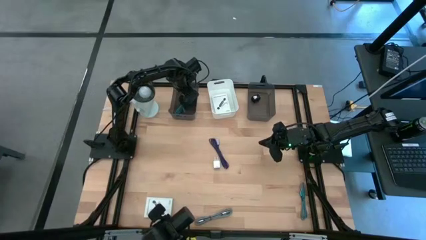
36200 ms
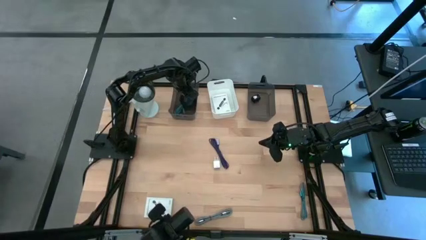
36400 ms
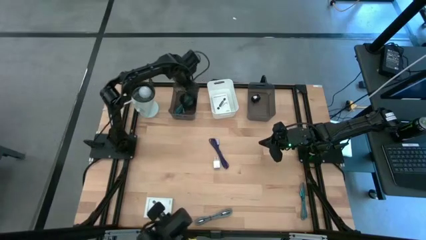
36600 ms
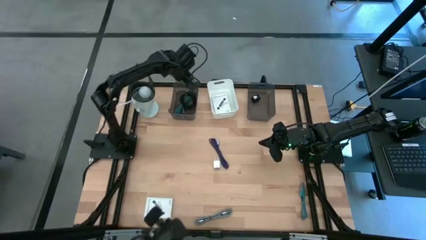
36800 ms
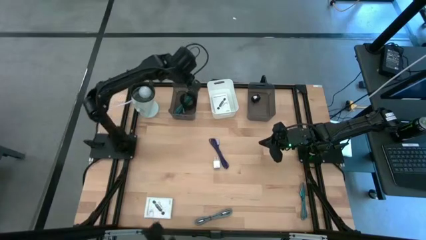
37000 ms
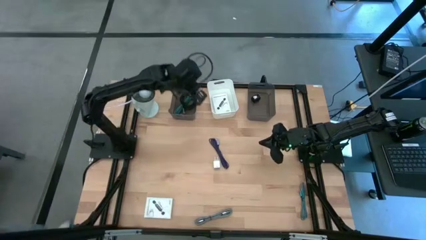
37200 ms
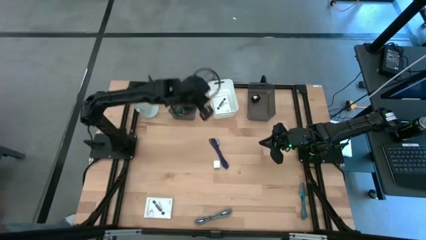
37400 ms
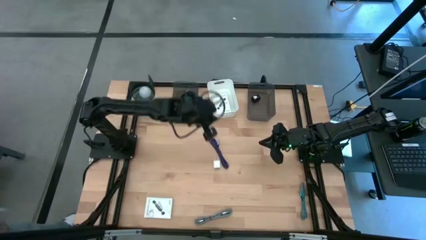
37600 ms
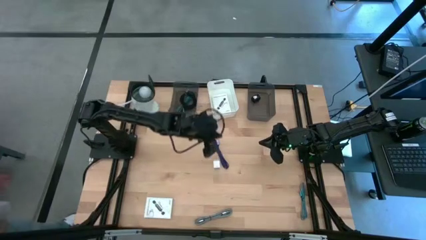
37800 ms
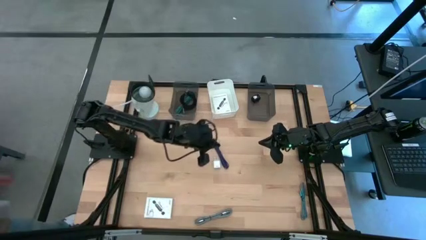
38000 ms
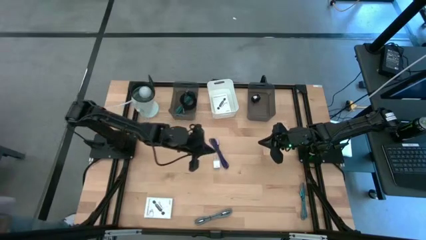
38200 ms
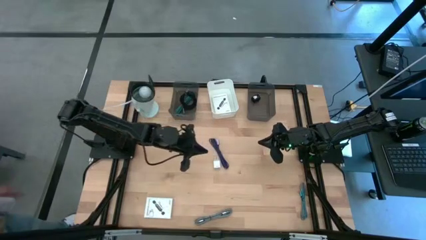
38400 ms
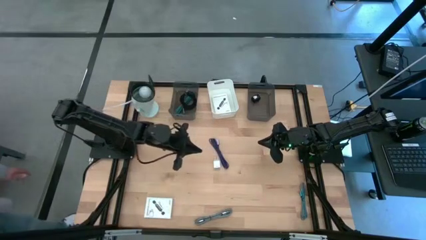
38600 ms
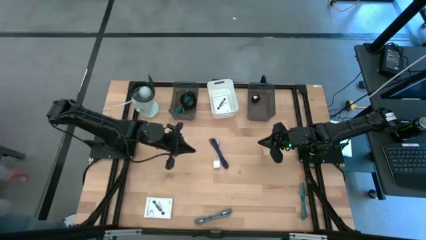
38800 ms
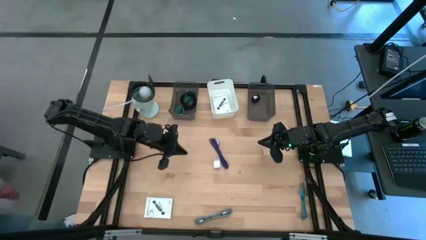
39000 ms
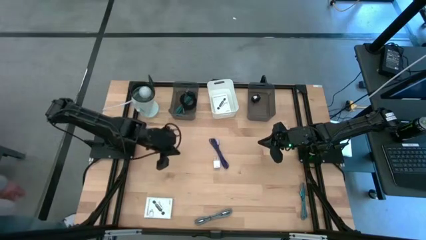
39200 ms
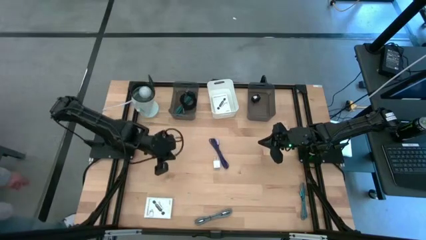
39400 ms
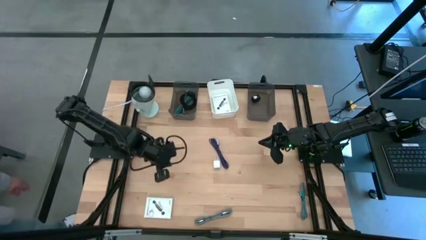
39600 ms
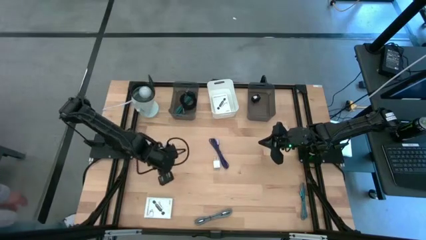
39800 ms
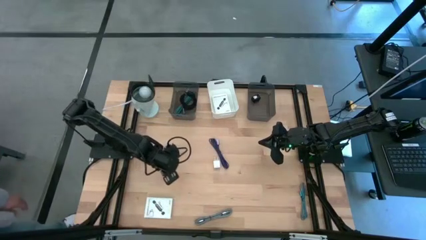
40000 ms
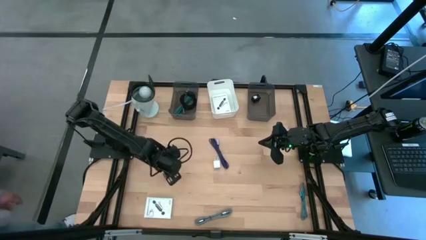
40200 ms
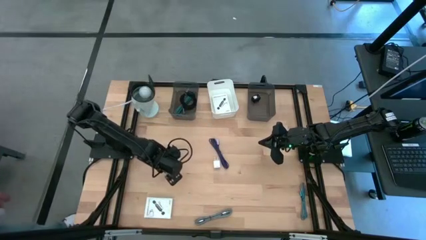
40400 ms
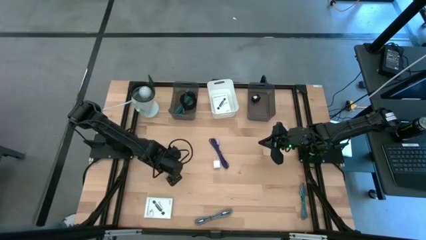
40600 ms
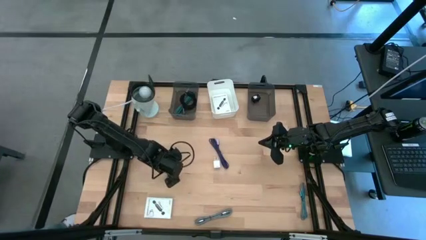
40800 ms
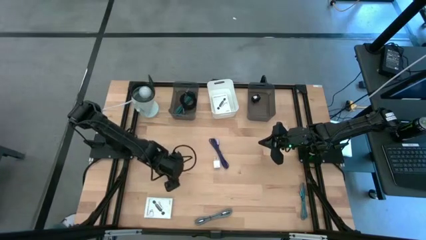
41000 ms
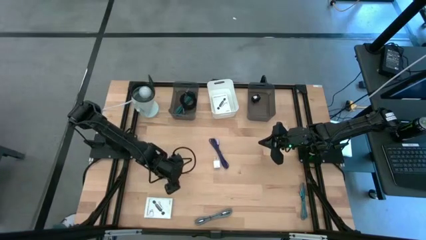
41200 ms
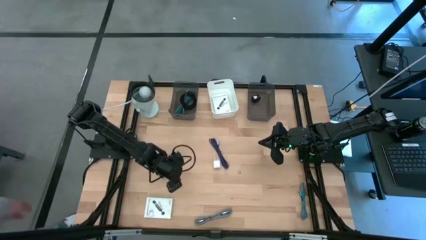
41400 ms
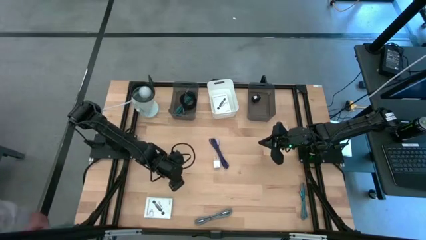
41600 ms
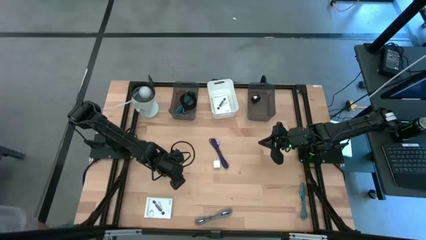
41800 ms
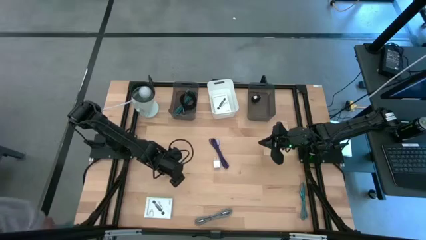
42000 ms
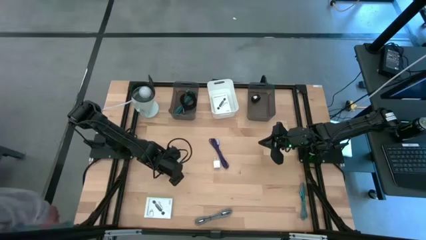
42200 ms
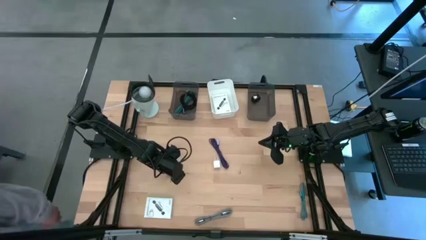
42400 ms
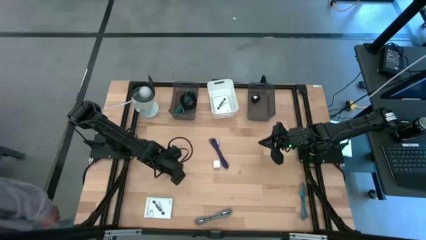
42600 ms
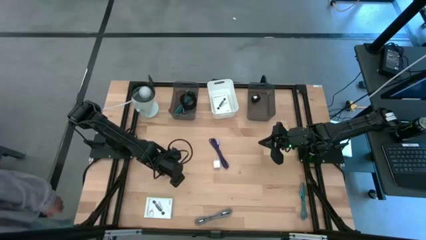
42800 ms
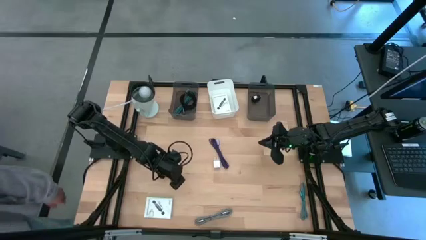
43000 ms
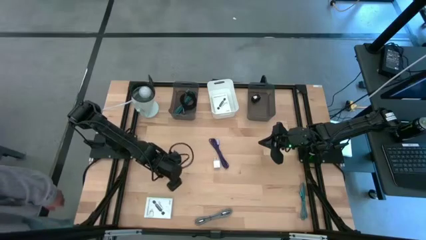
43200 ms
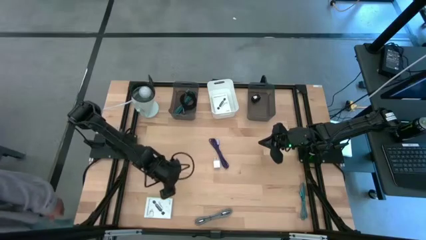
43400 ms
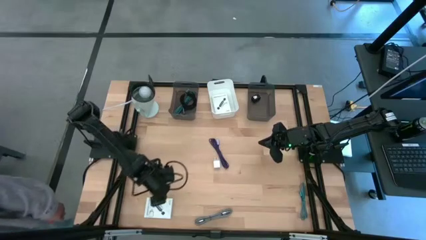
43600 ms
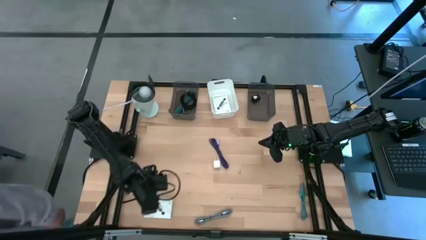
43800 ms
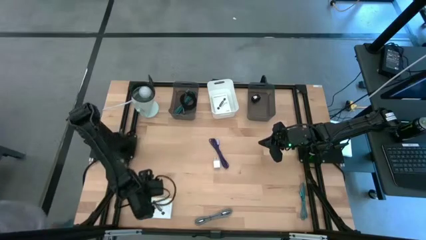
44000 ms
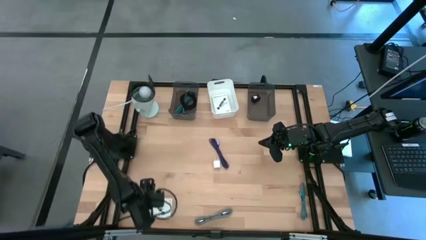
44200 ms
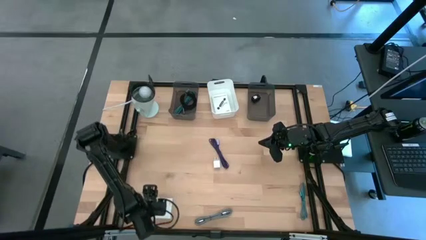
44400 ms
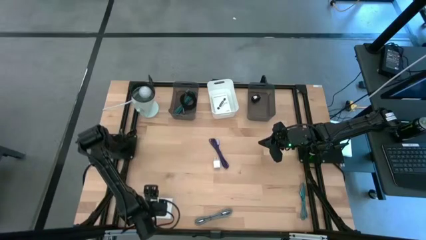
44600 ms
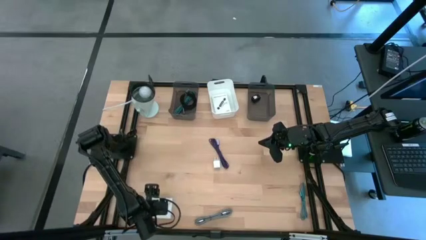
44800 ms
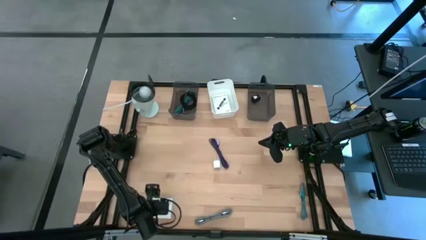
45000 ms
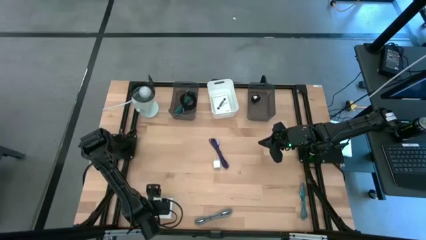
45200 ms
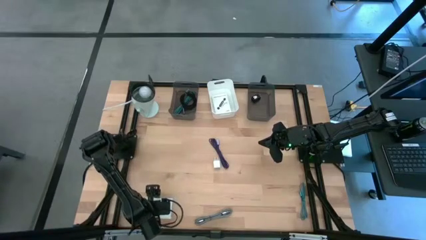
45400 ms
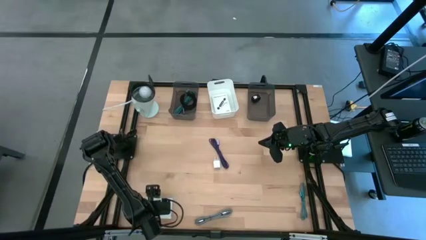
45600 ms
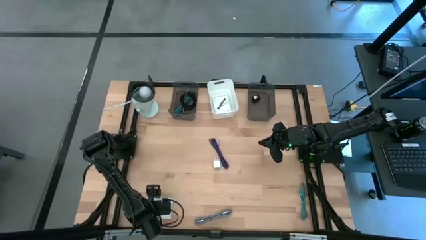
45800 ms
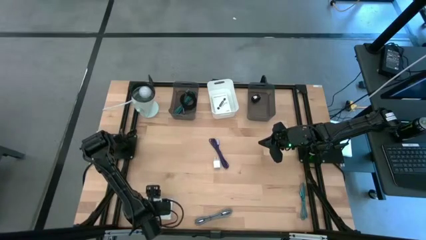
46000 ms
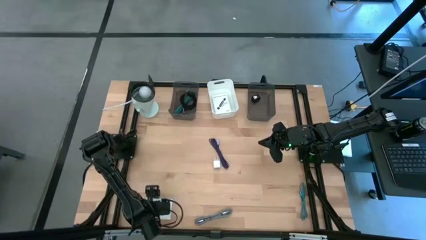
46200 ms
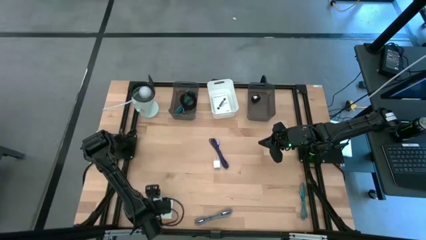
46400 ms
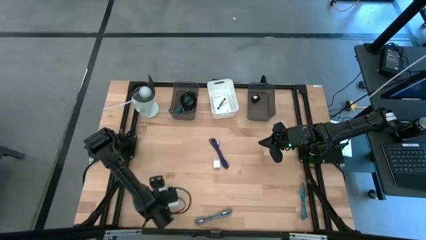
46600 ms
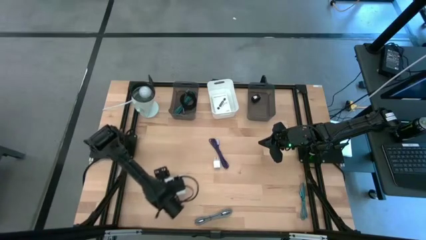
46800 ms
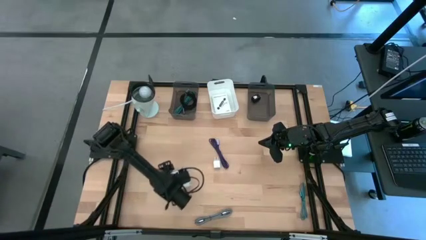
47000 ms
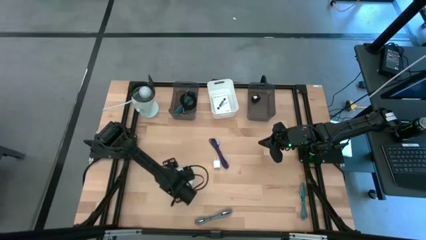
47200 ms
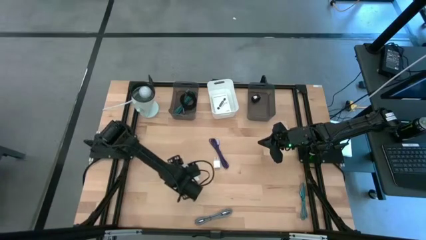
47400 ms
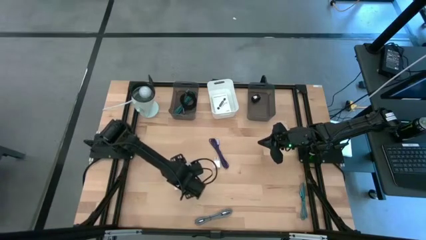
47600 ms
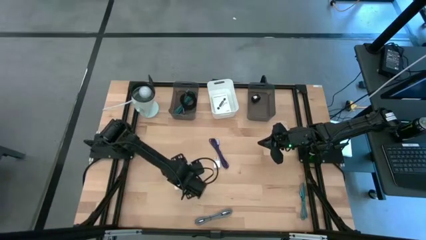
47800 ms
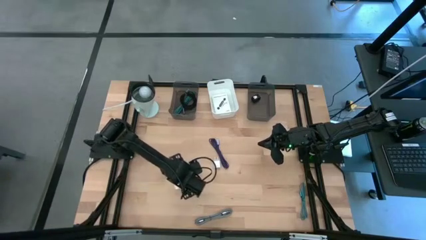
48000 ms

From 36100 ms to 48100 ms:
Task: Pick and place items into bin
Put the white card reader box into the white bin
